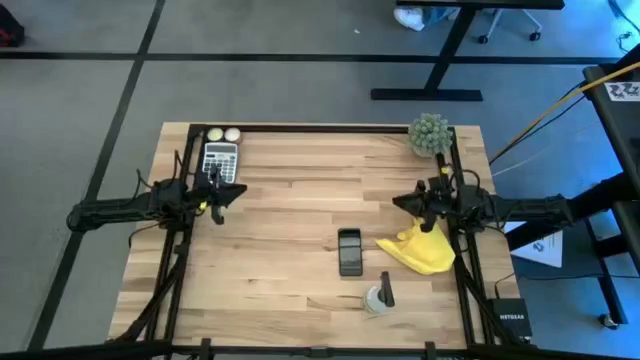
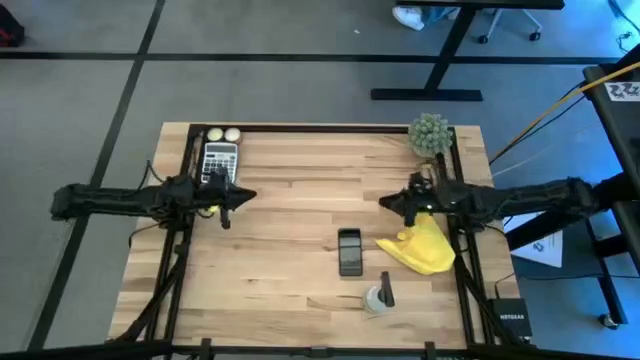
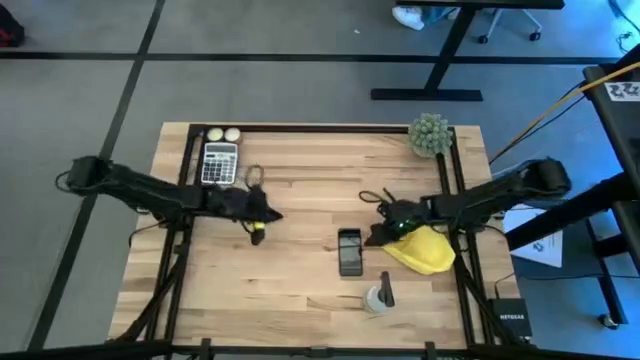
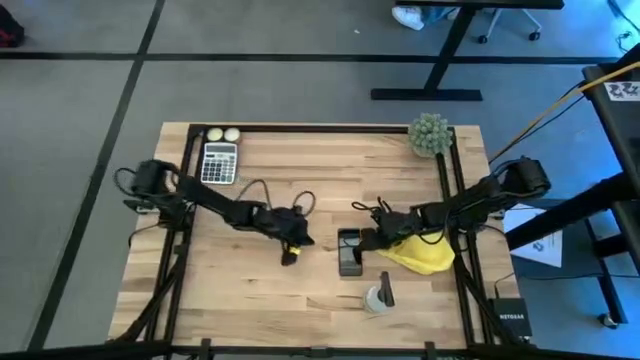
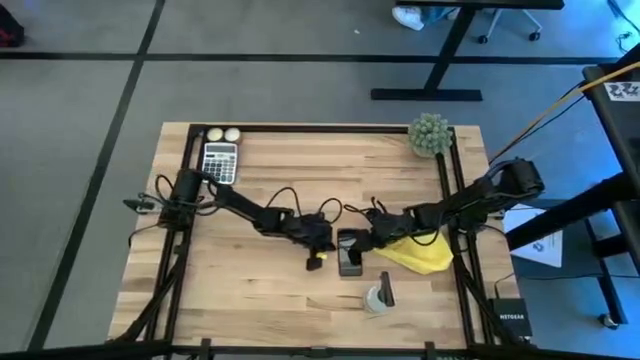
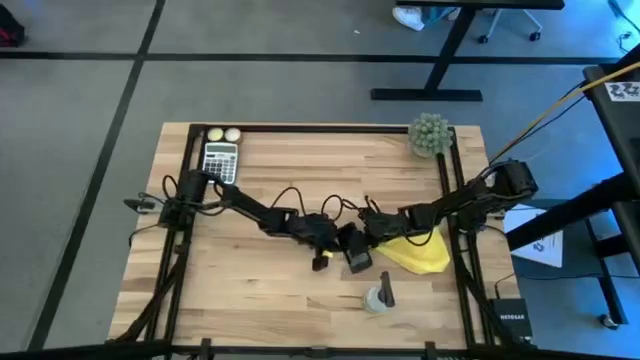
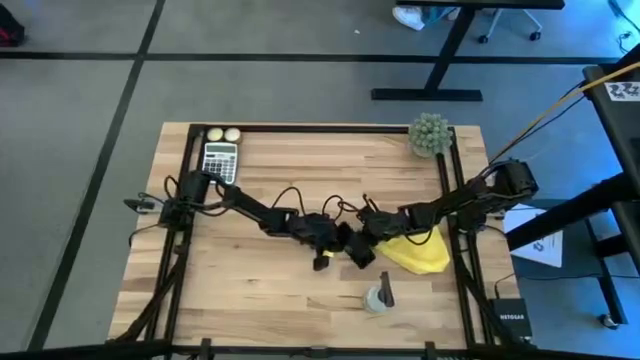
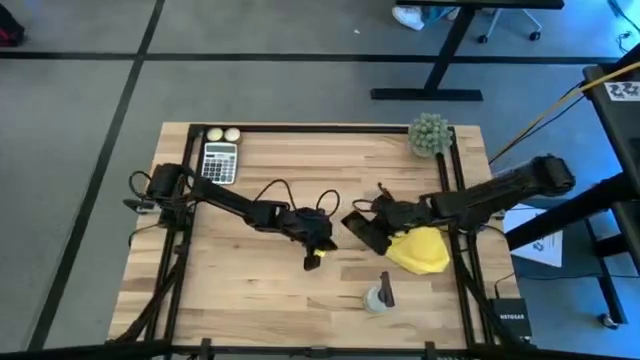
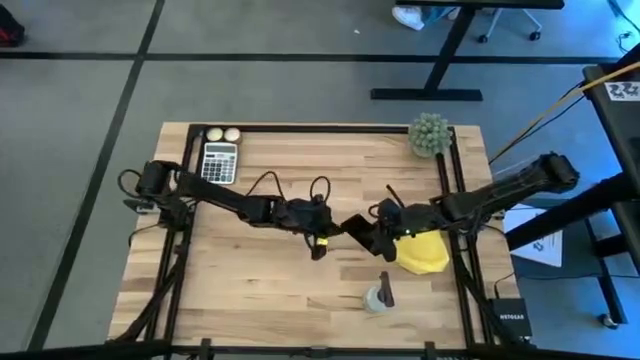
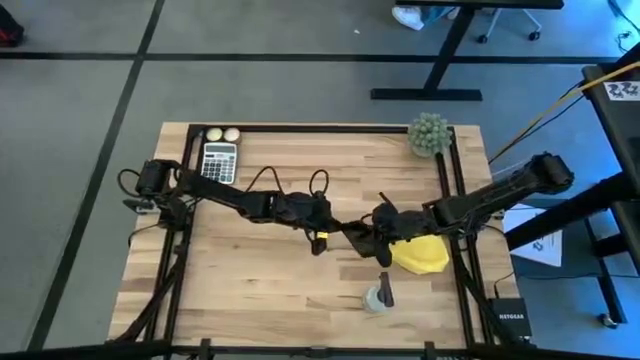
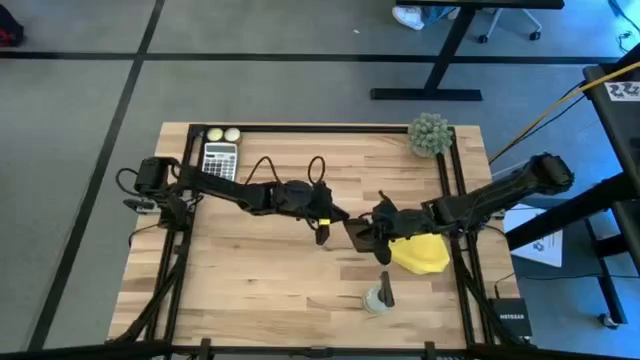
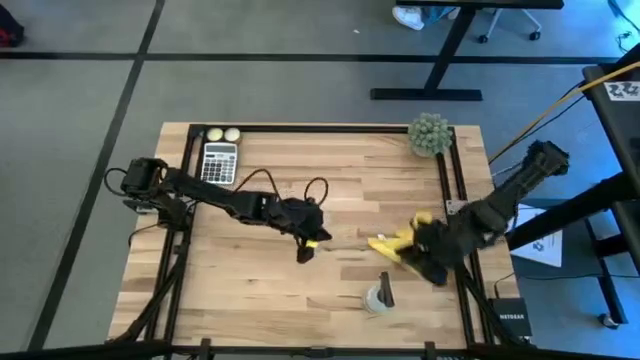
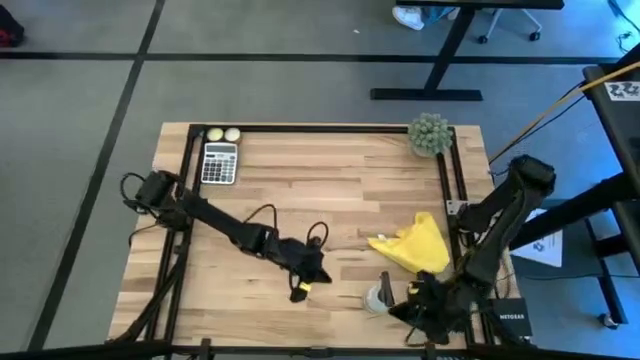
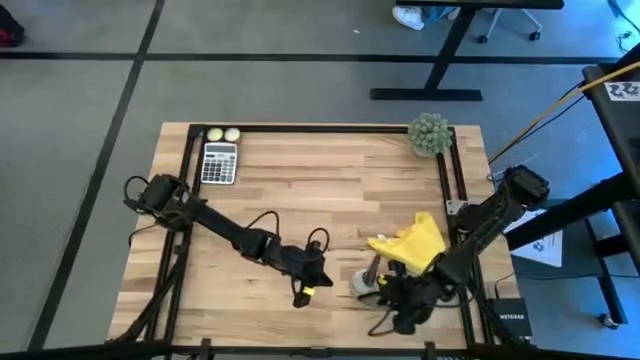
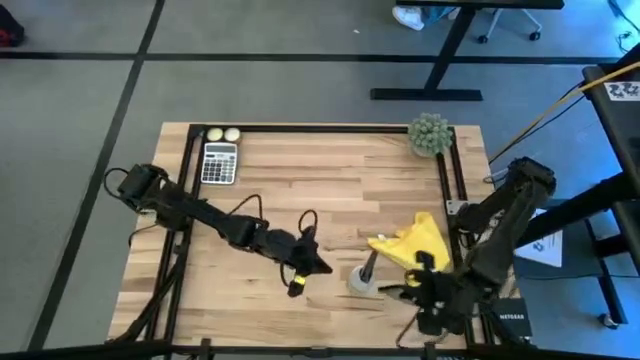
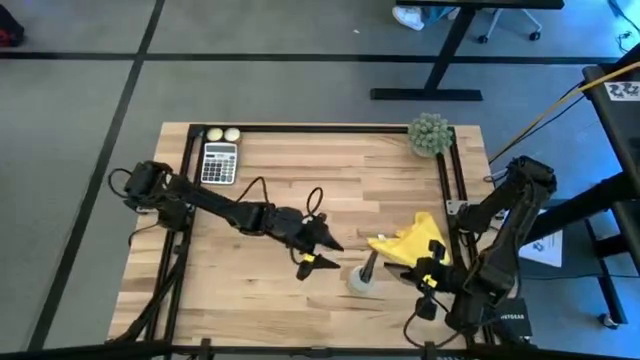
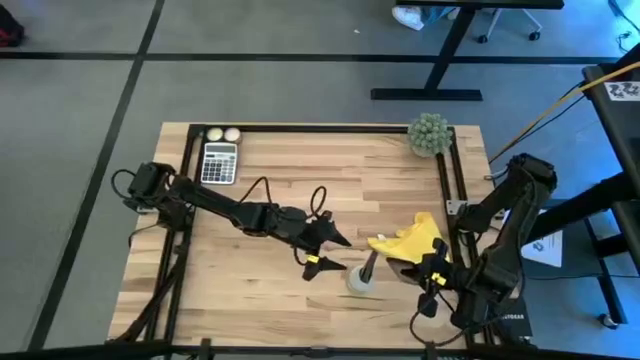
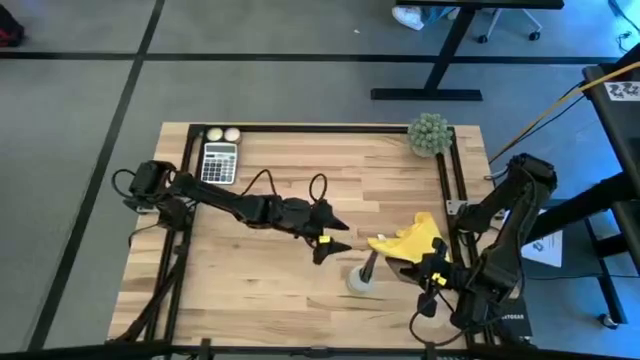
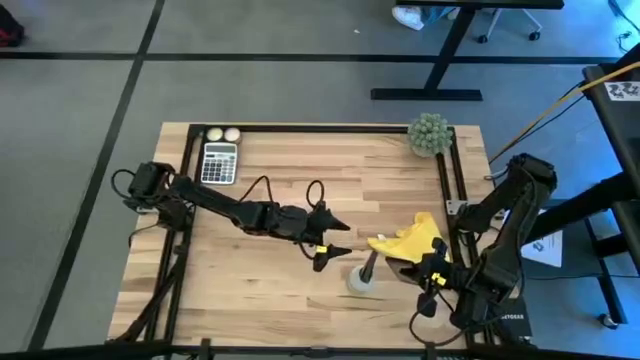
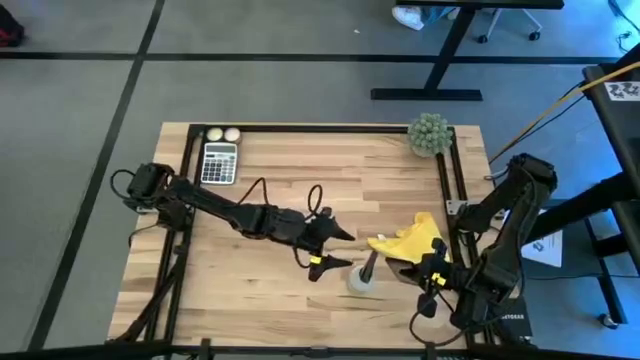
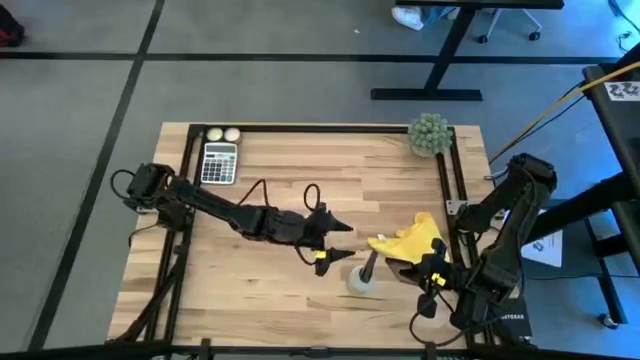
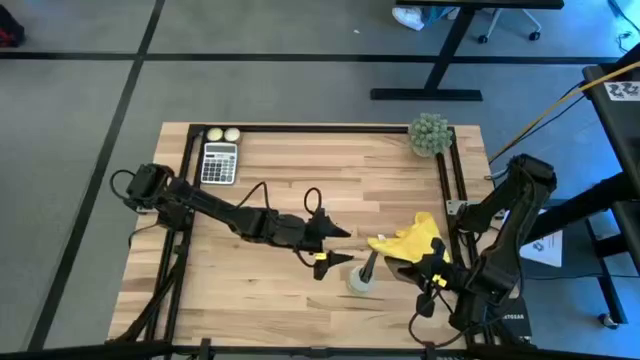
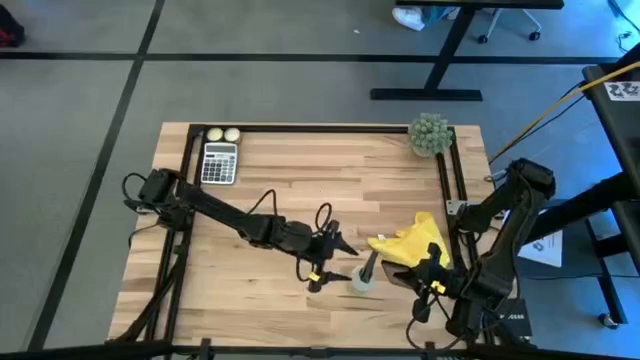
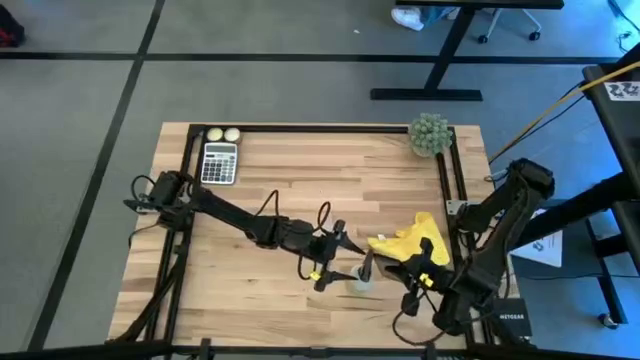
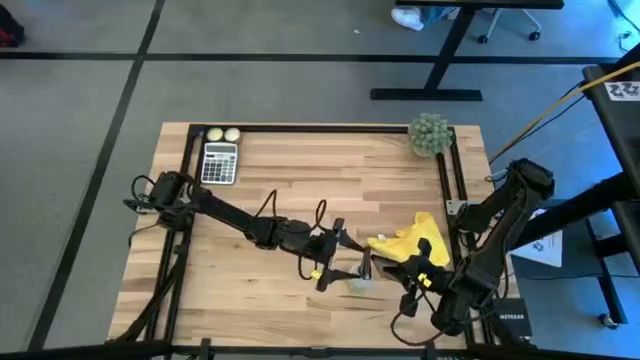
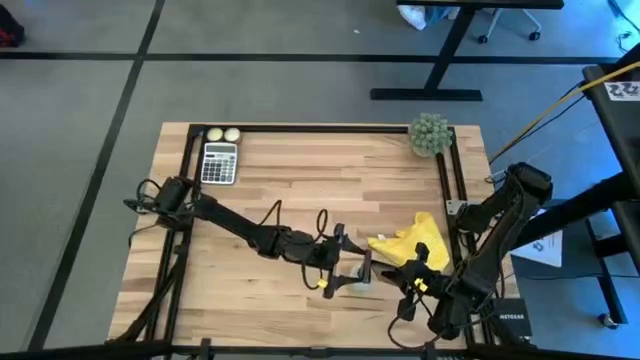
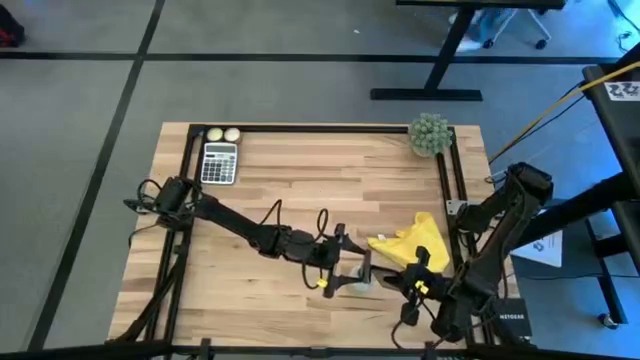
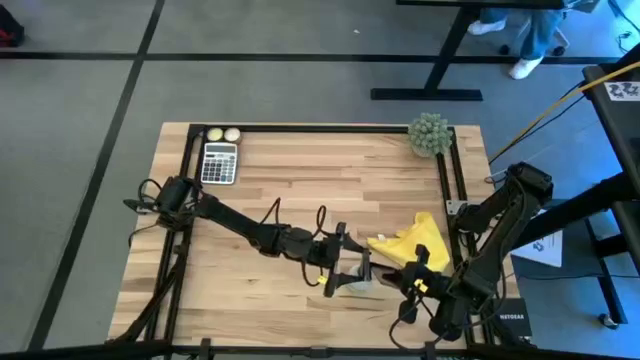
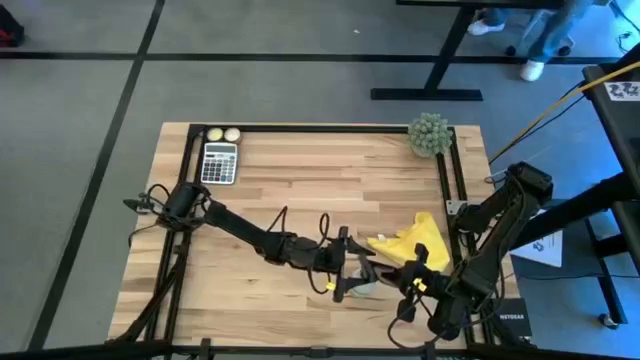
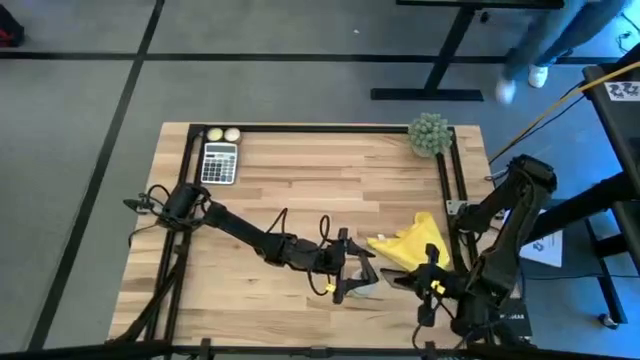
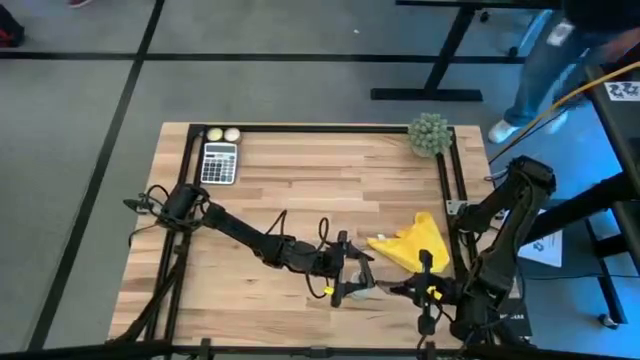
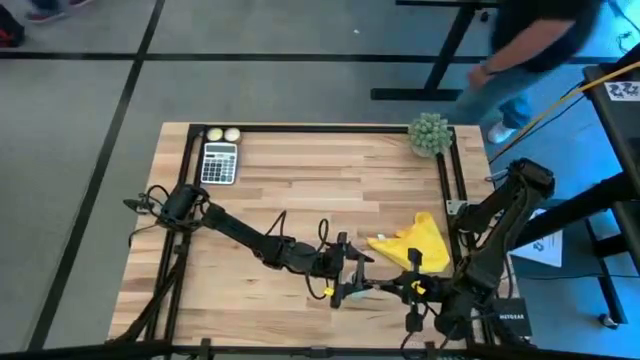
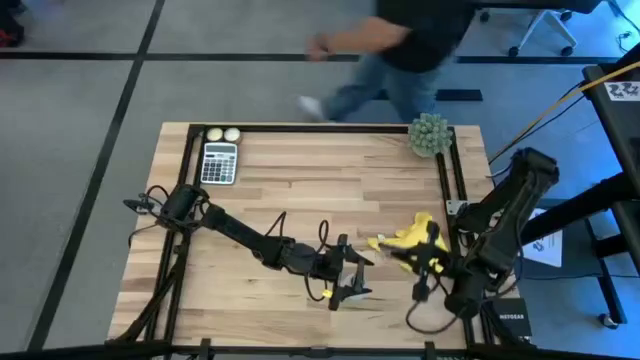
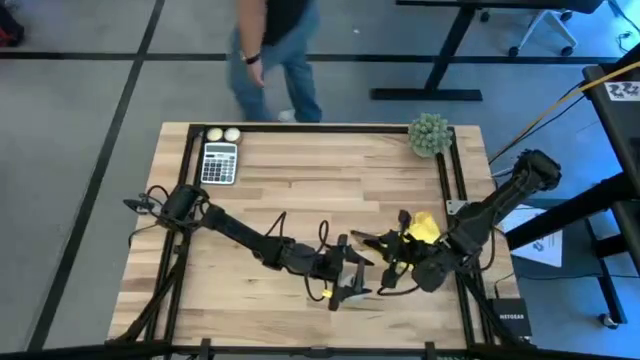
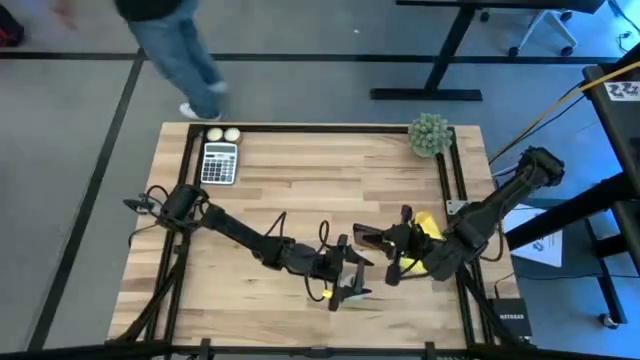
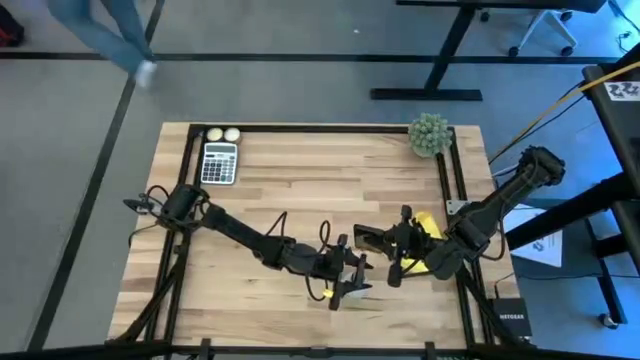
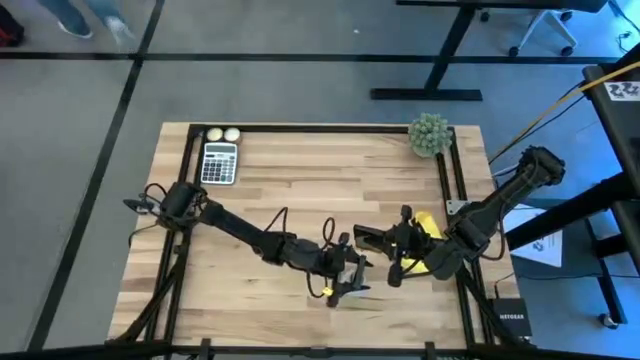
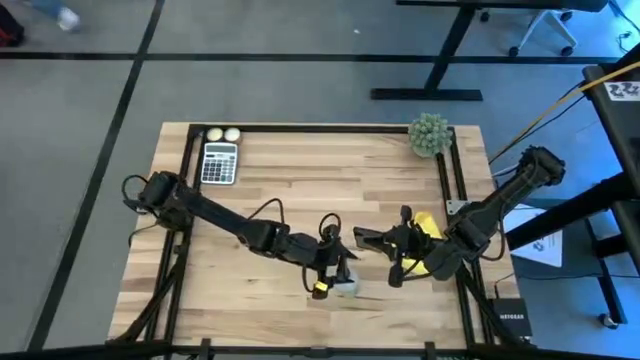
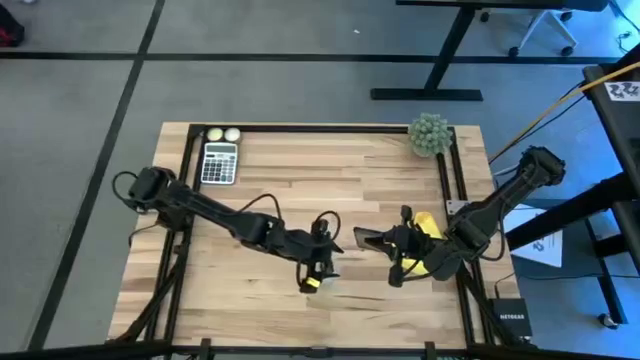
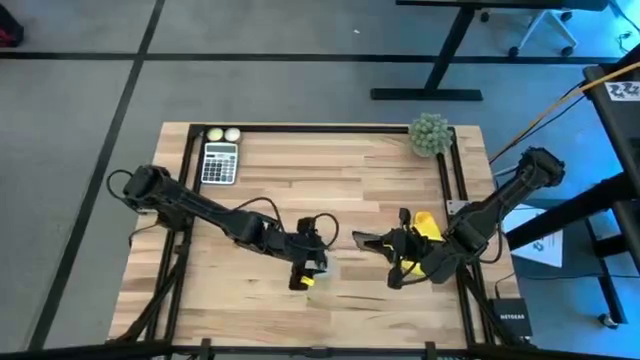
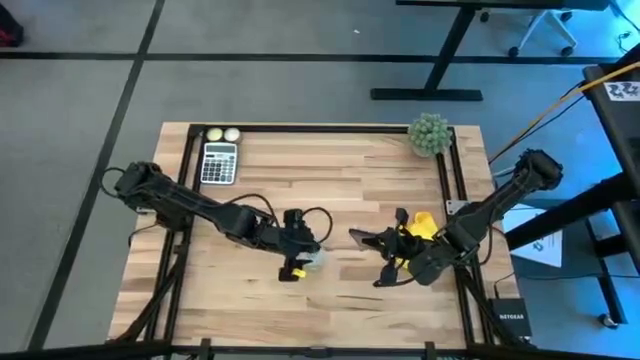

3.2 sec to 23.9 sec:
Task: Apply microfiber cloth
Spray the front of the cellphone using the spray bottle

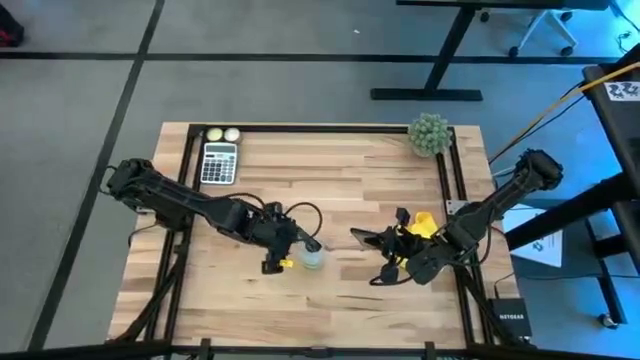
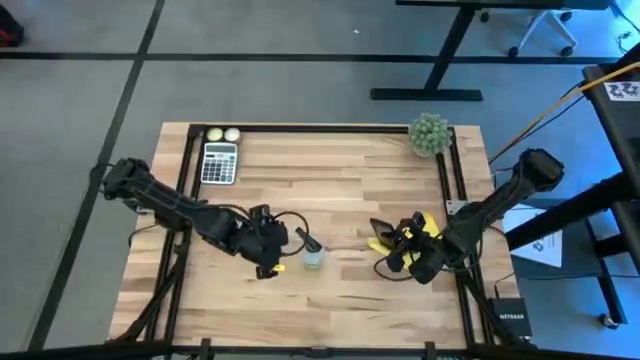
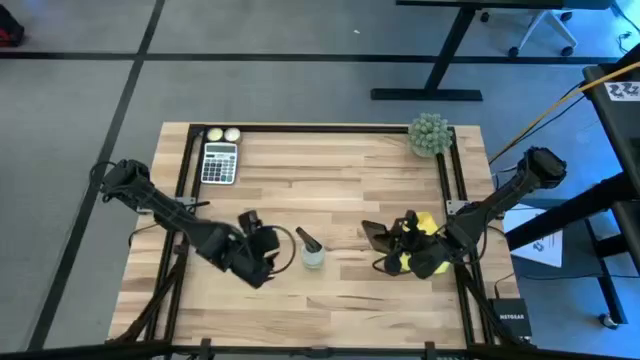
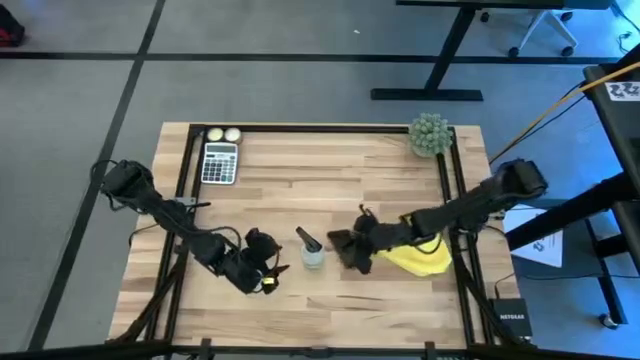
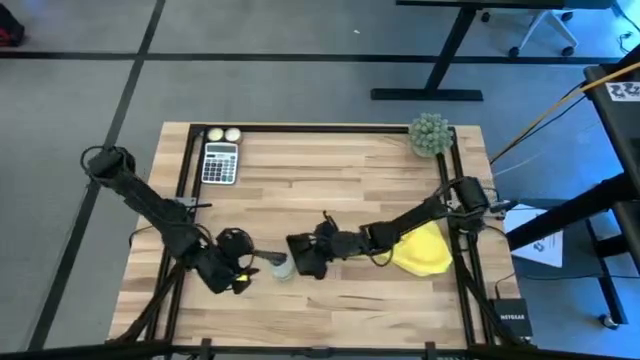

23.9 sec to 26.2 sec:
Adjust the spray bottle
